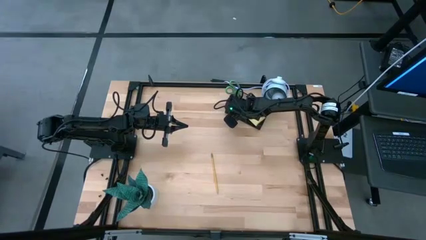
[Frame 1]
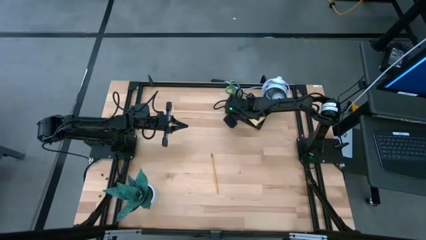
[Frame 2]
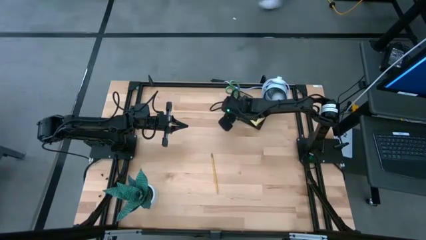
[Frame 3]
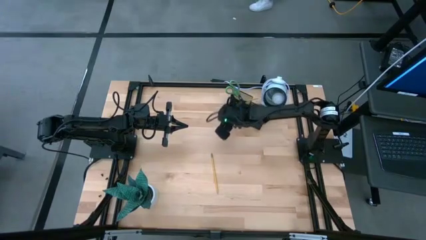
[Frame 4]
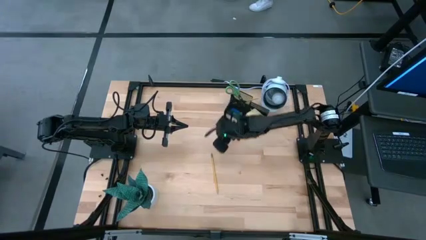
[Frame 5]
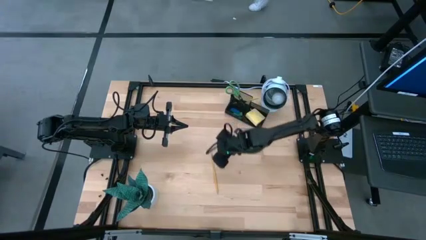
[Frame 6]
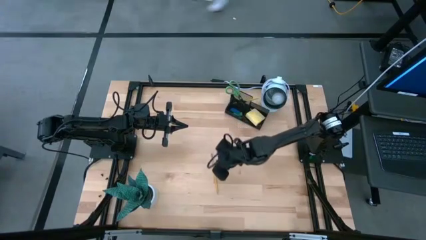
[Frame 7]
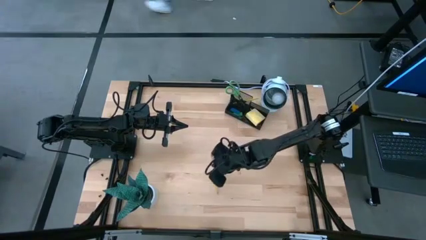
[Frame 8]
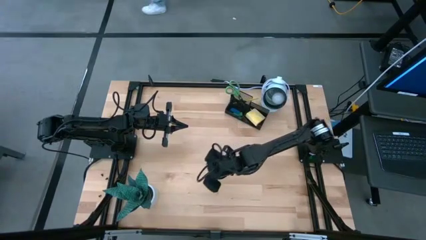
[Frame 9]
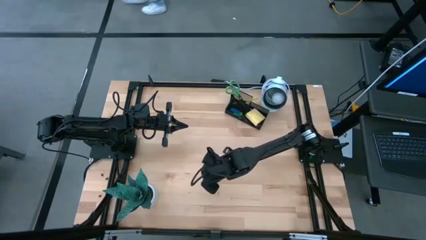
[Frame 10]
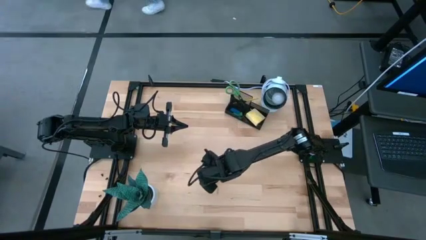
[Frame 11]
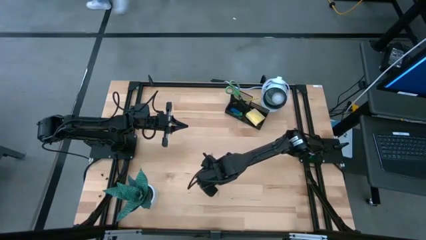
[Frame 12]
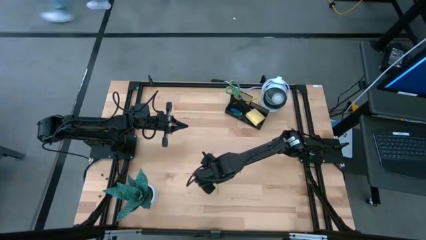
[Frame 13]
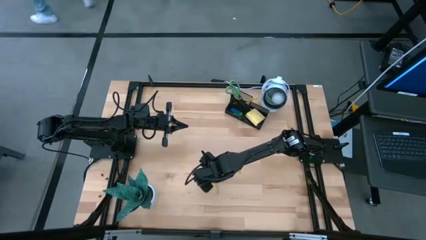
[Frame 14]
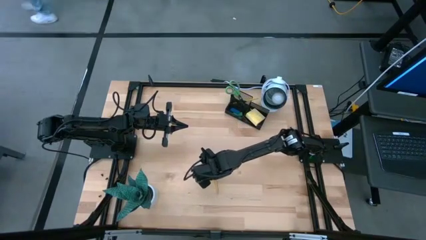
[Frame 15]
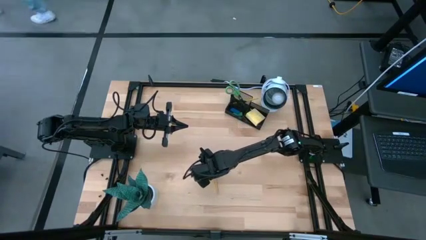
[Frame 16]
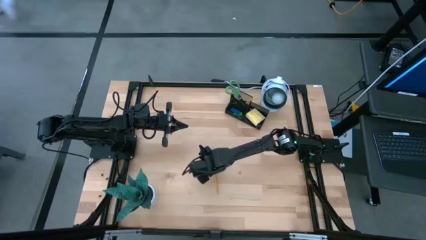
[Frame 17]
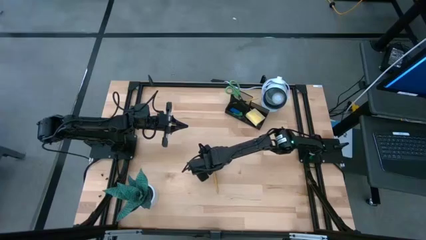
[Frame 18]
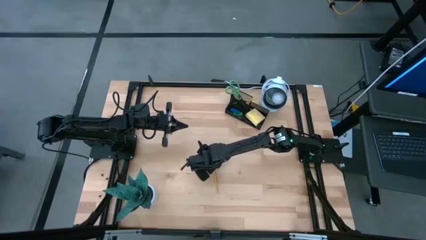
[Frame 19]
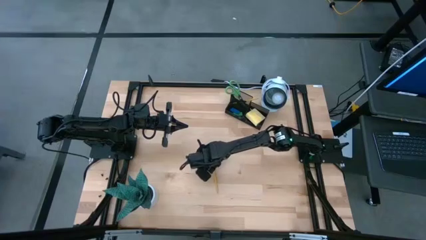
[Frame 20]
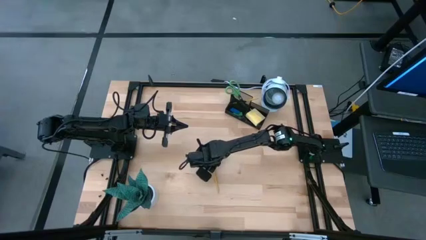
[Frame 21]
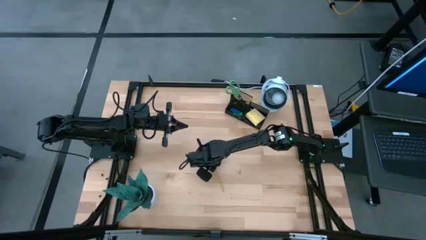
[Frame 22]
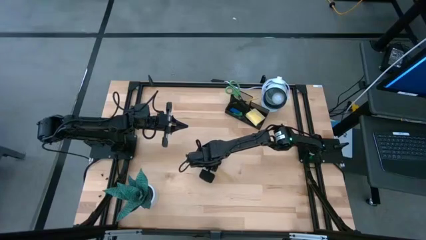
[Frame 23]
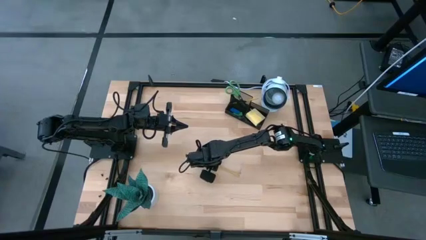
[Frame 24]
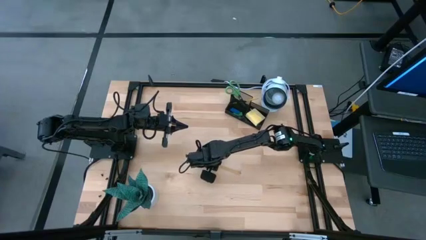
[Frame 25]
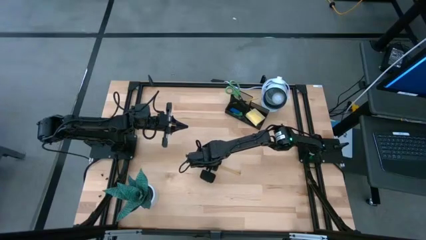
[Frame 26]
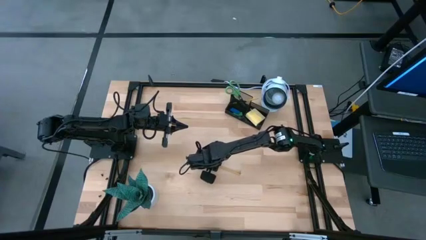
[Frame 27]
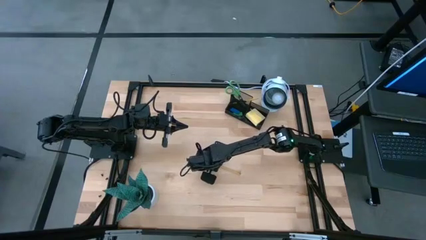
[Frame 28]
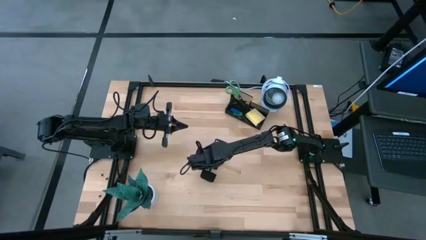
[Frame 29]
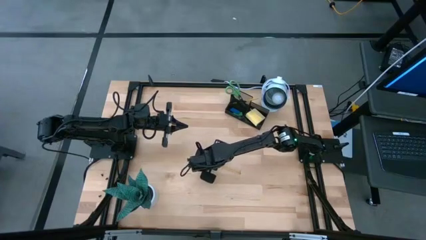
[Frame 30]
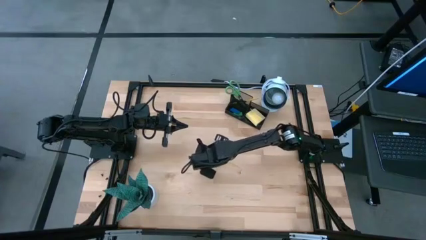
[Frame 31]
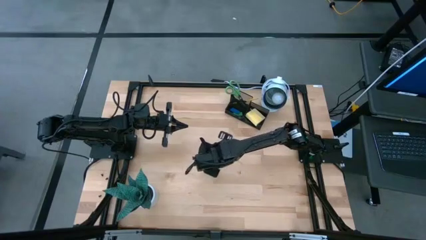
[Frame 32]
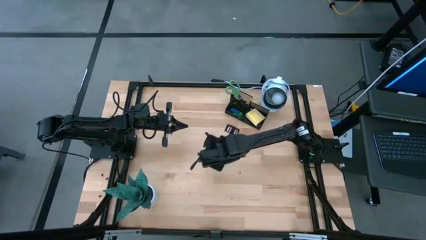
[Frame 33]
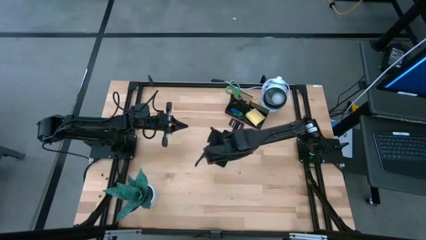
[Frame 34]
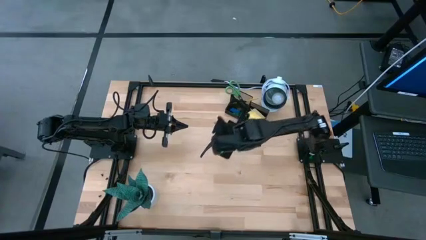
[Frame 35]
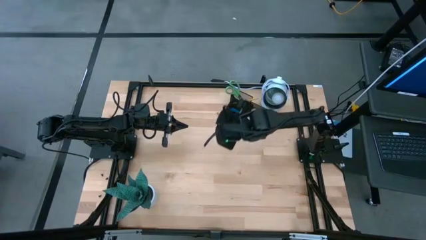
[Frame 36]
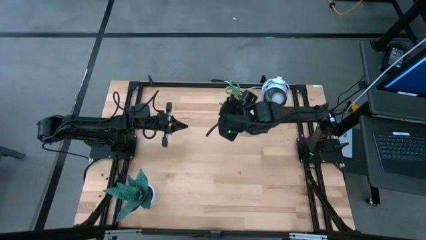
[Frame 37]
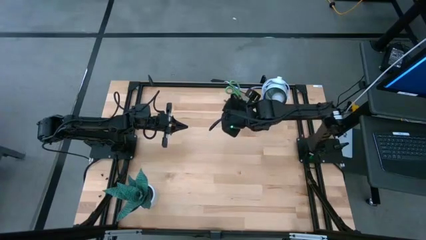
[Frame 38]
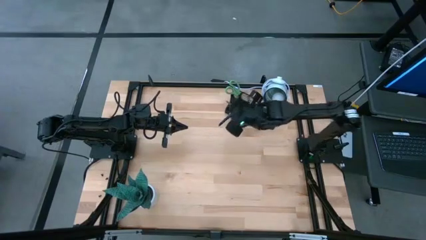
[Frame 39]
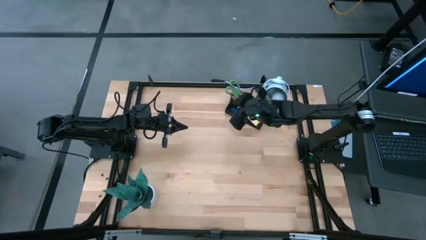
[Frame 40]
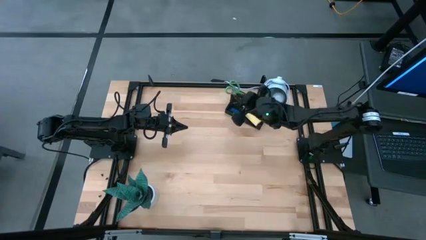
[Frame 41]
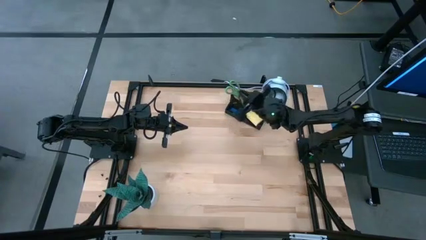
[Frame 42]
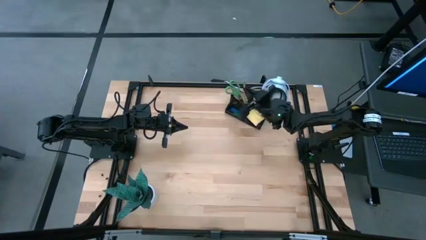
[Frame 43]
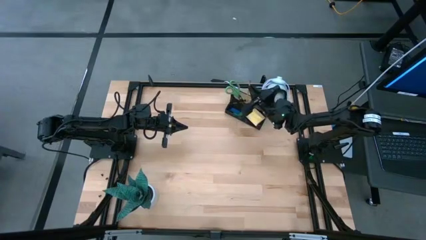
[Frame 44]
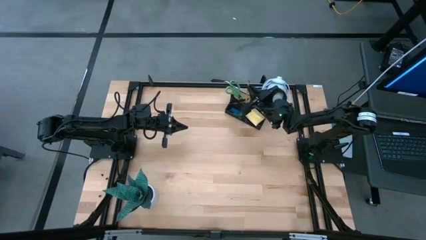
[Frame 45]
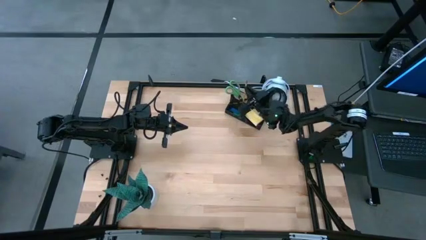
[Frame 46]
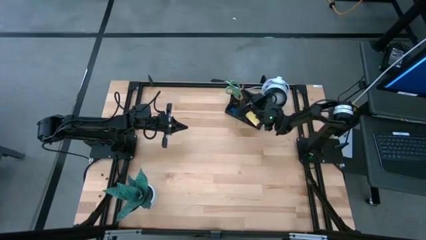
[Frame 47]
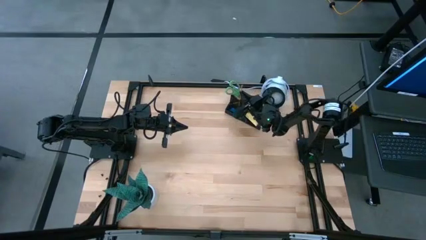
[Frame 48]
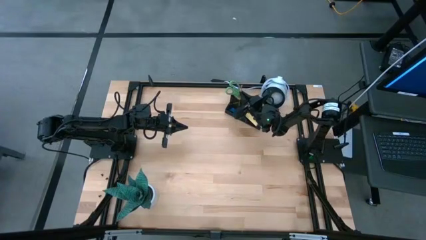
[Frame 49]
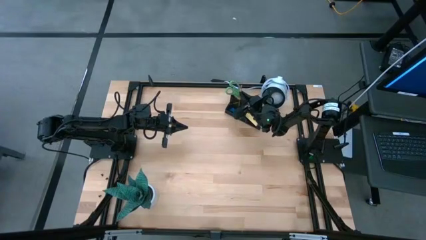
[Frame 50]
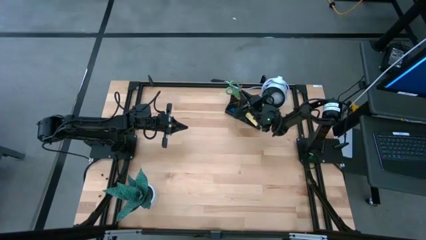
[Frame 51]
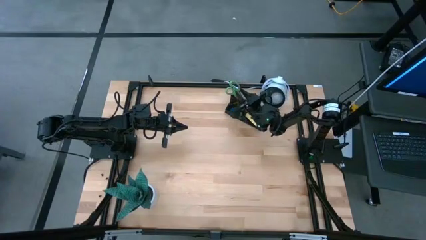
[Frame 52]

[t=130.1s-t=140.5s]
Task: Pick and place office supplies into organizer
Put the yellow pencil into the metal mesh desk organizer

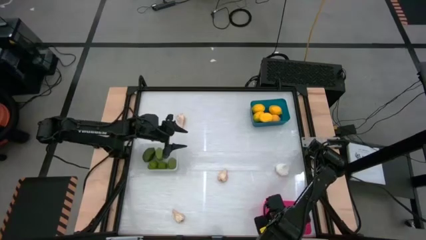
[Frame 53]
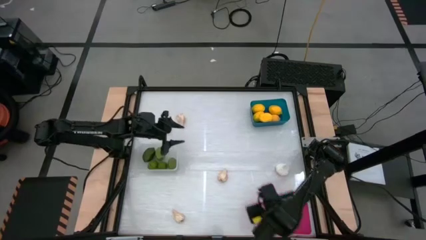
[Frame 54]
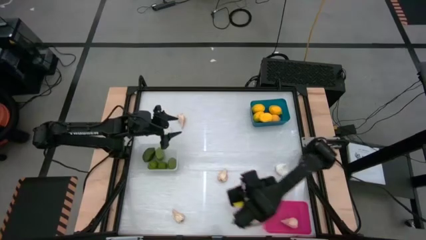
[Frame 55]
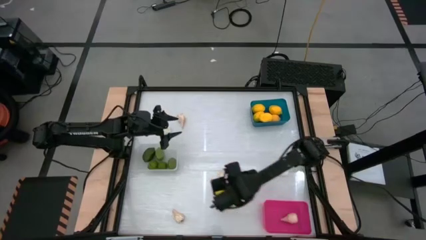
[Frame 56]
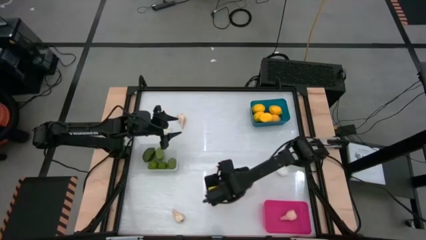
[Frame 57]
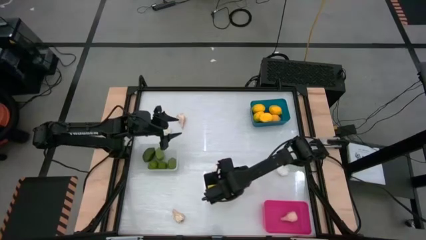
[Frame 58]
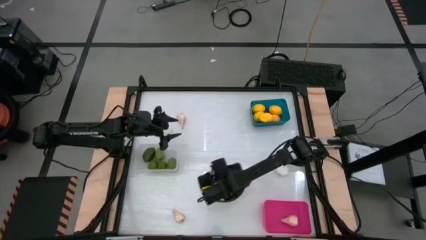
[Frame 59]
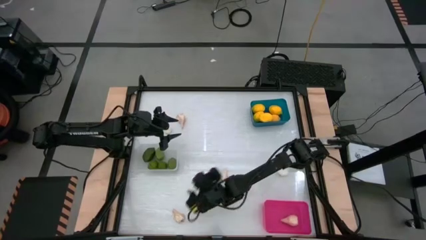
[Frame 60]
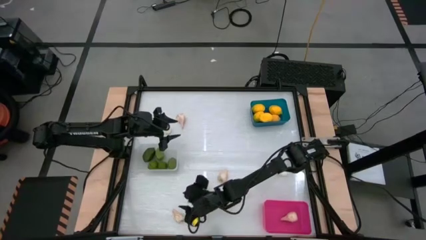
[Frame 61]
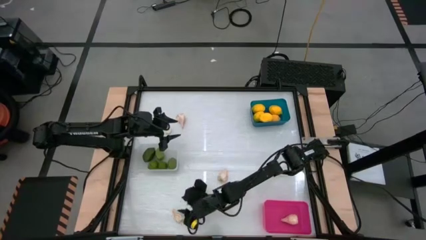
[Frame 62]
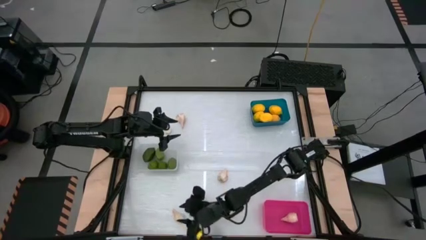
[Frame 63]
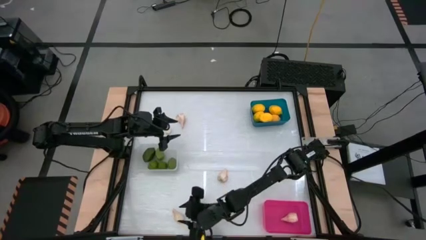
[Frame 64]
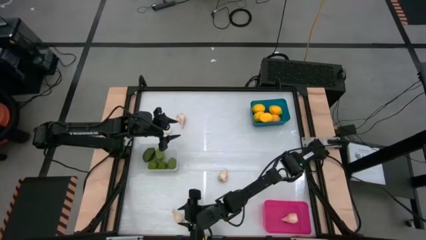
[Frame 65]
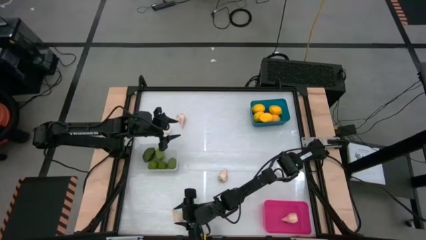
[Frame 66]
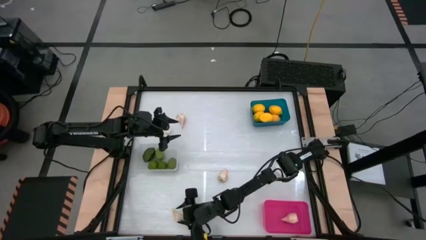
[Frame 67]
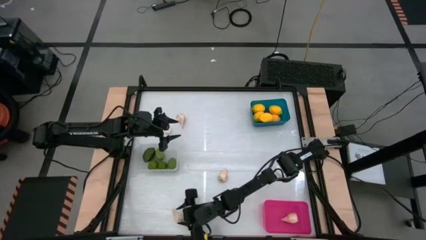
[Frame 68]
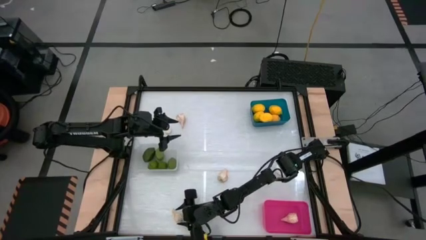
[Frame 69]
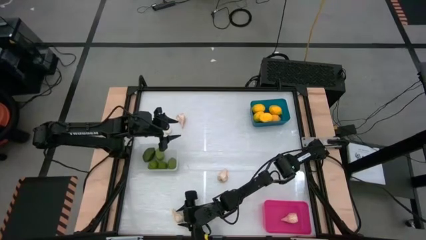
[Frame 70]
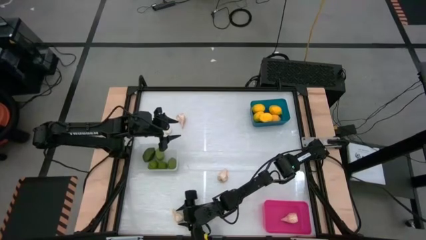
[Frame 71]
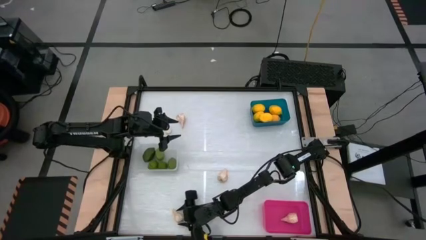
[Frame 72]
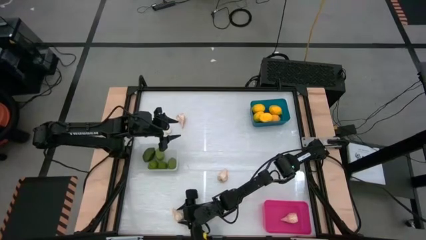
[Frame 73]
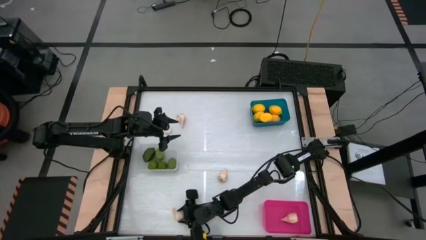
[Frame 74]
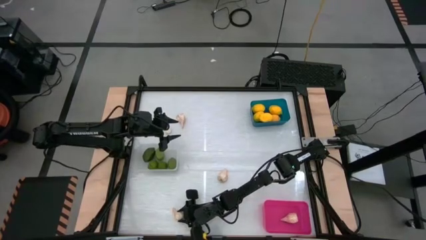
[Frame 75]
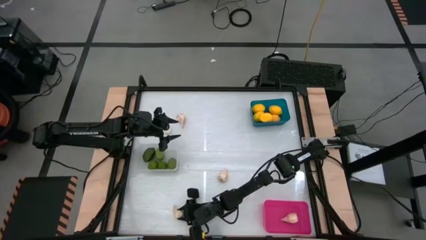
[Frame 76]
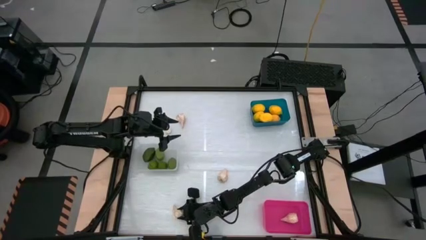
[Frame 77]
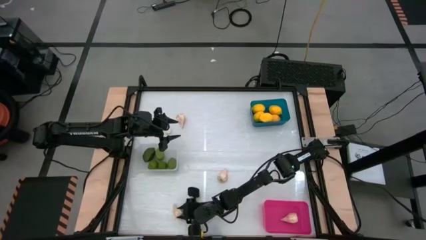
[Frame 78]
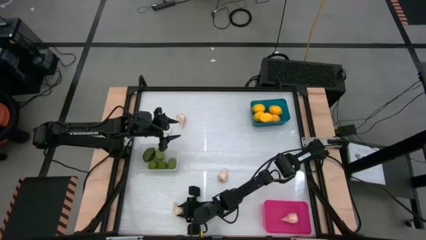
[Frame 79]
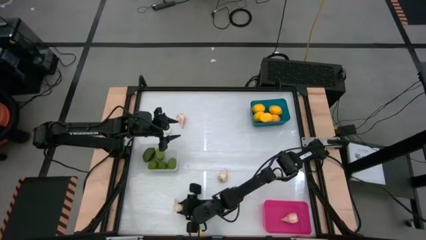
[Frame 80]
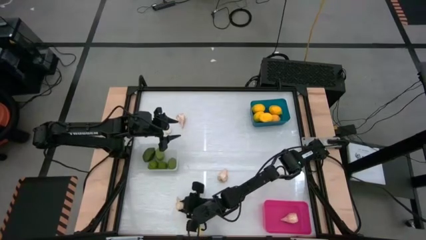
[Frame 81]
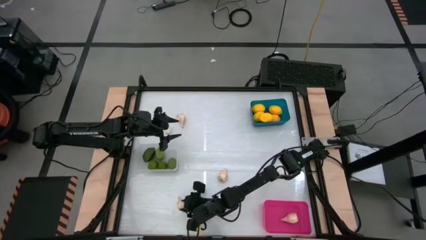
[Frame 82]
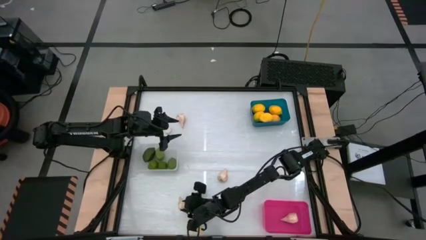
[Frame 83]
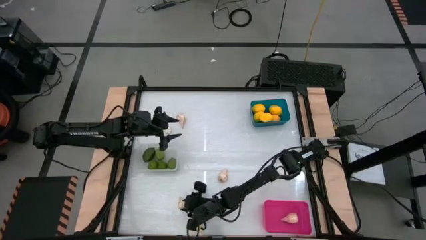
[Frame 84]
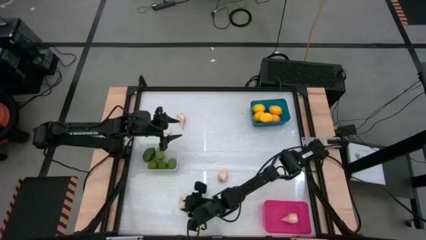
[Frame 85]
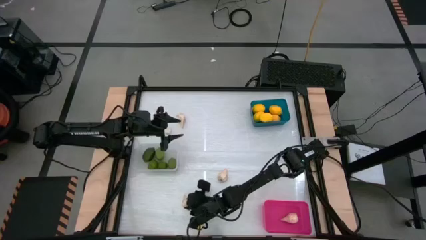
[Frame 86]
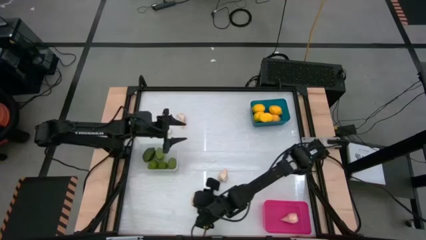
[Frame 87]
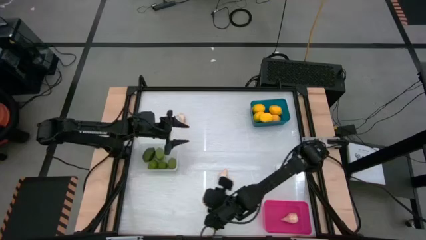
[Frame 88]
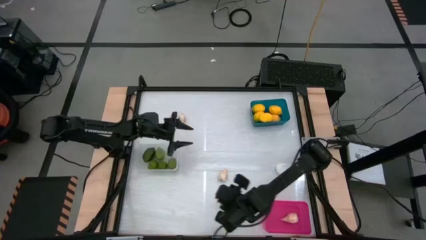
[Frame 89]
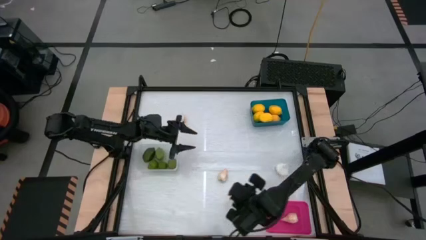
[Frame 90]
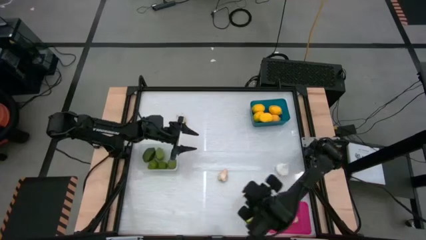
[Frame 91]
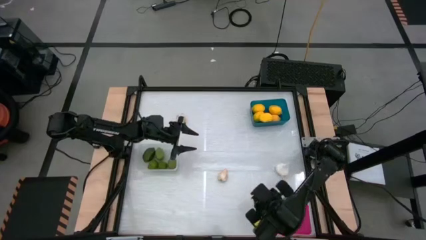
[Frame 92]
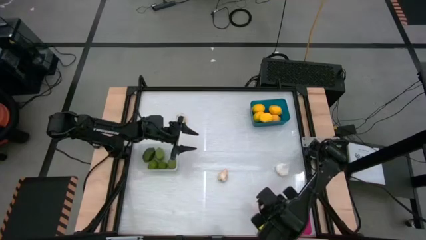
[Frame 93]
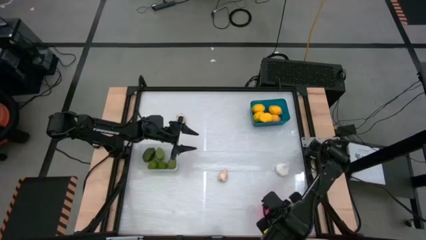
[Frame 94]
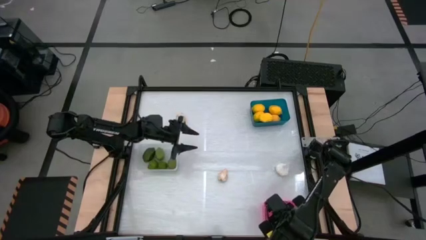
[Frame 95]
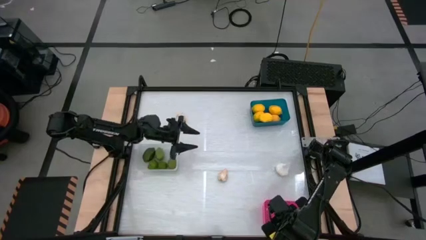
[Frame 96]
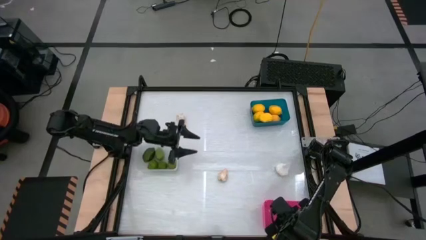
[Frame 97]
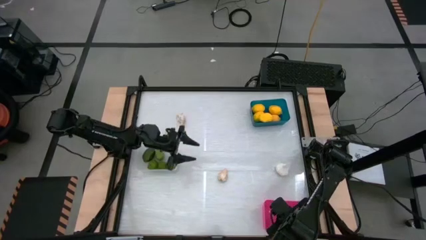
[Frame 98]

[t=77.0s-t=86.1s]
Task: Sort produce into baskets
Put the white garlic into the pink bin
